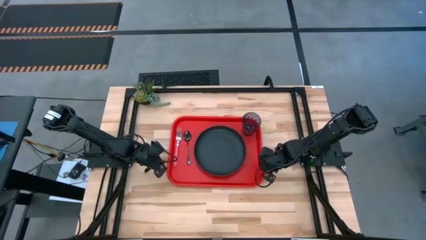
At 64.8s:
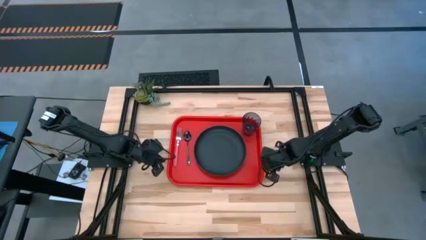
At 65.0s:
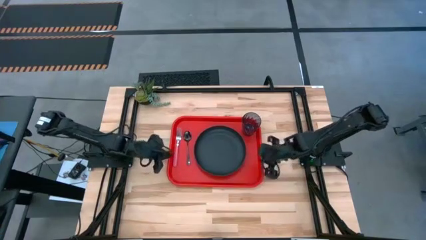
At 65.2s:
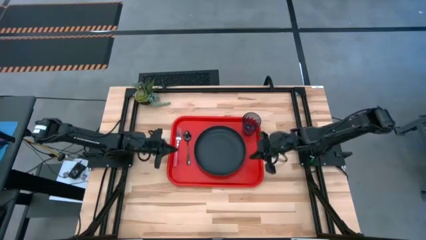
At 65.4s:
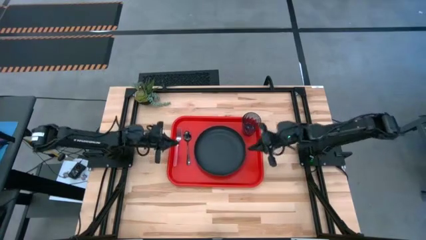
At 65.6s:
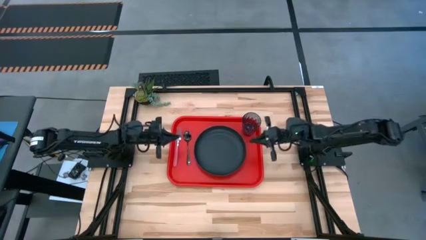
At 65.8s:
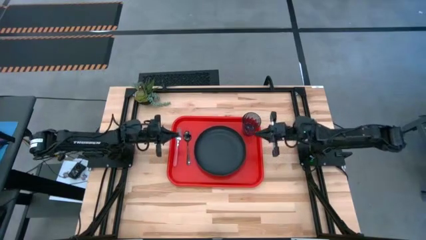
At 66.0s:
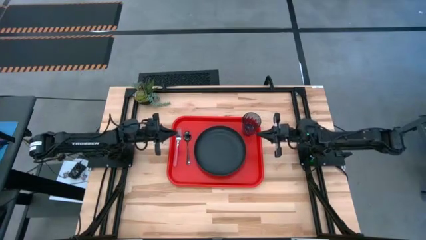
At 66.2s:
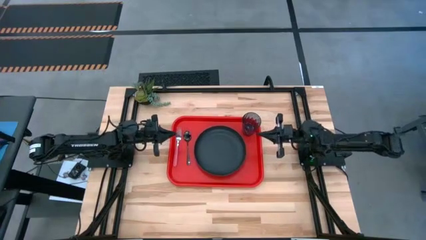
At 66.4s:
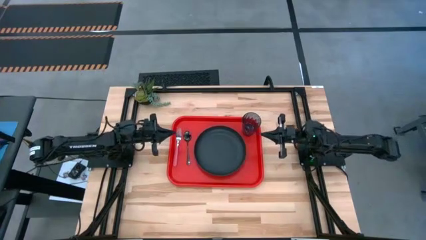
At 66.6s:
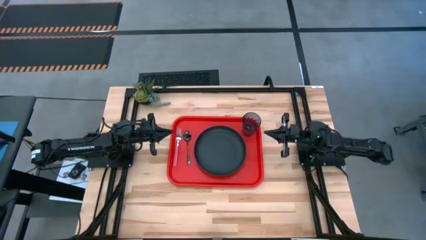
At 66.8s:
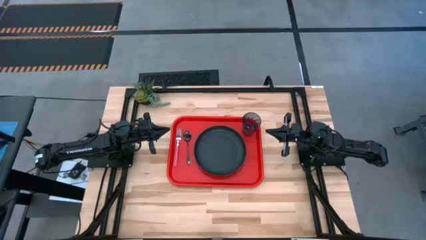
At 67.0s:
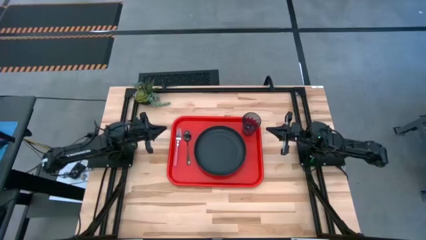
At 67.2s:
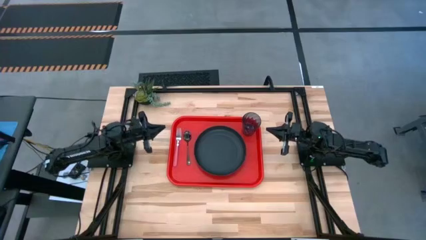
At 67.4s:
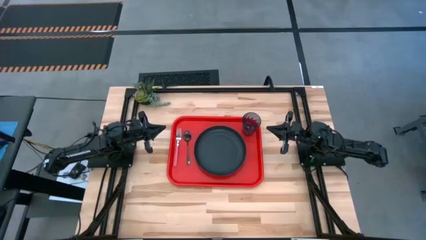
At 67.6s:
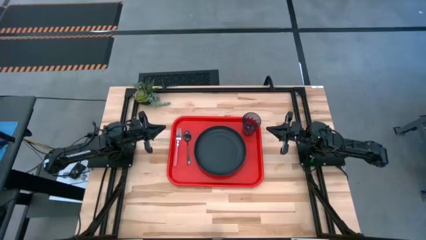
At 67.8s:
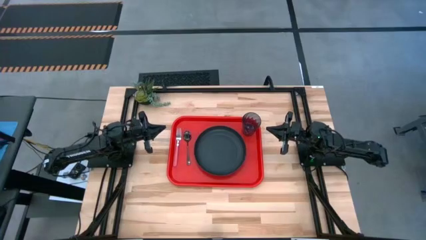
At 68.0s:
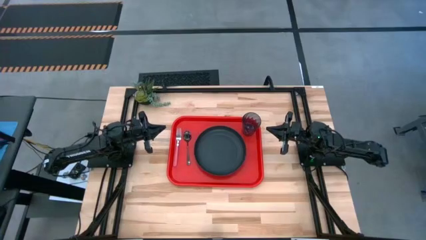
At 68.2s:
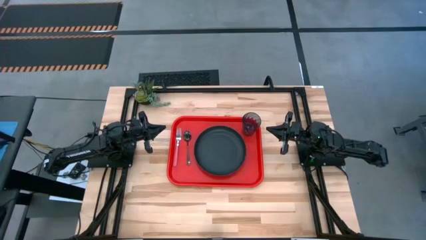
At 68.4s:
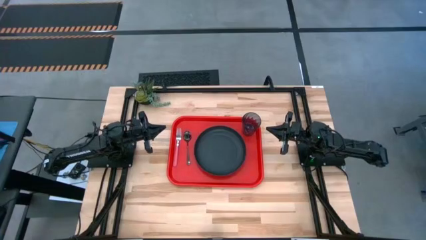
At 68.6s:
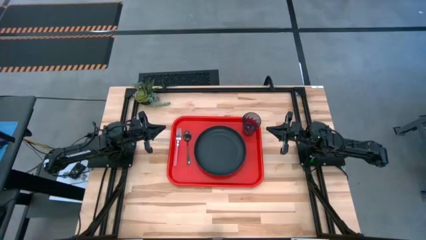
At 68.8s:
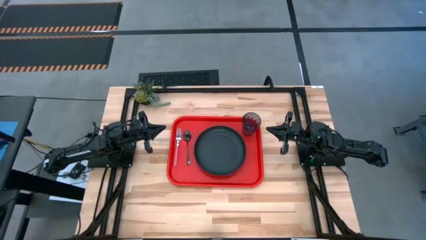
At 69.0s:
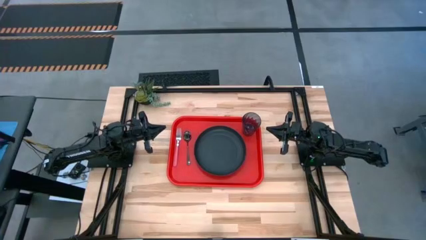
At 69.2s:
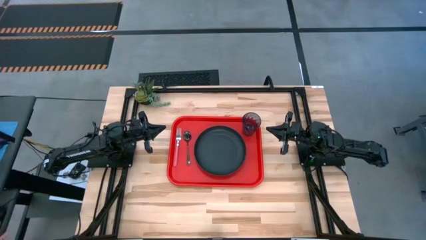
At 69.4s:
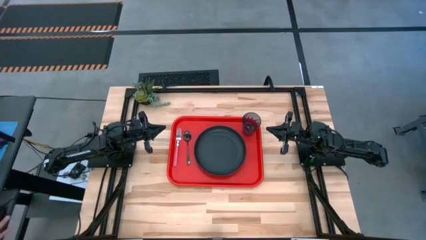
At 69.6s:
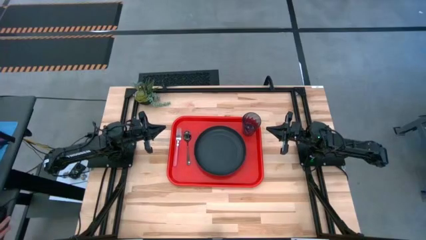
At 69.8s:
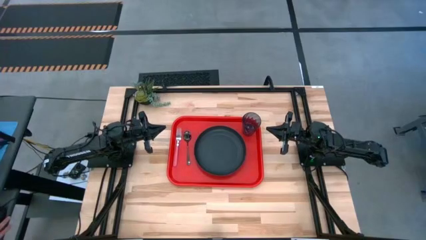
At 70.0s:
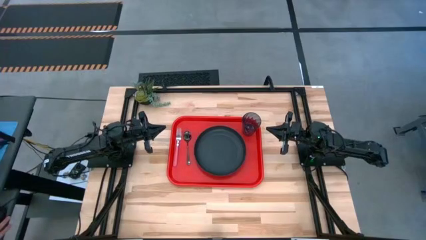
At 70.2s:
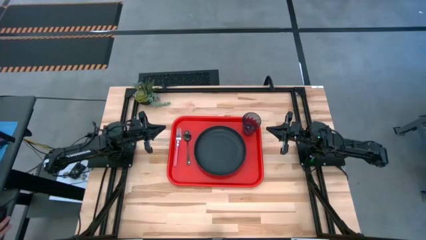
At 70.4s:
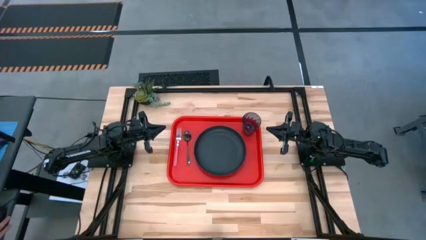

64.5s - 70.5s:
Task: Pick and place plate/cup/fork/spoon on tray
Return to Home Position

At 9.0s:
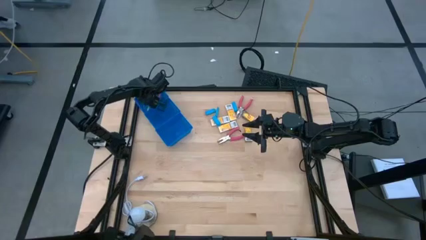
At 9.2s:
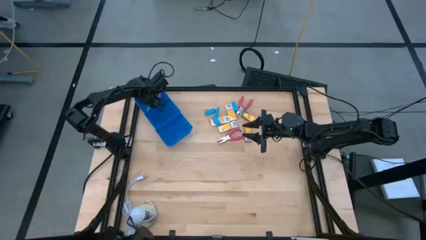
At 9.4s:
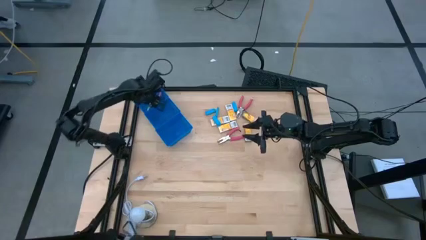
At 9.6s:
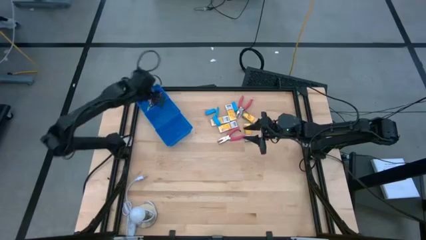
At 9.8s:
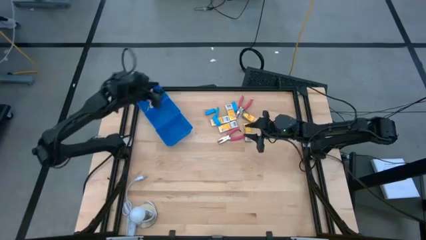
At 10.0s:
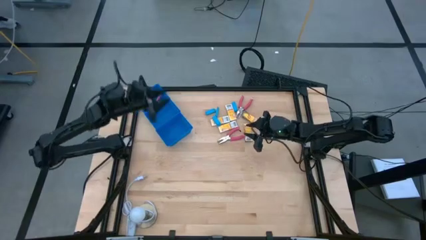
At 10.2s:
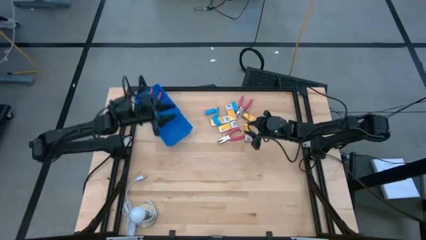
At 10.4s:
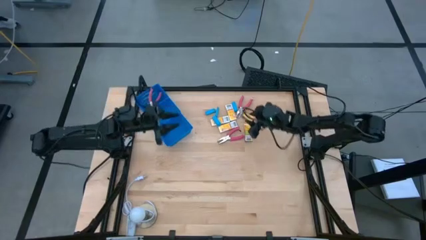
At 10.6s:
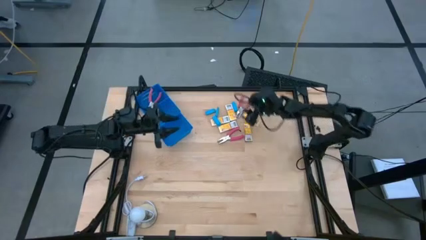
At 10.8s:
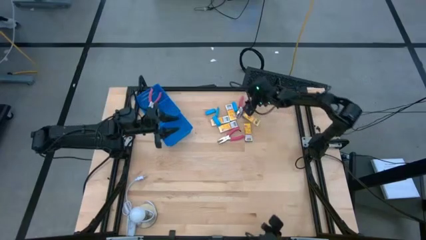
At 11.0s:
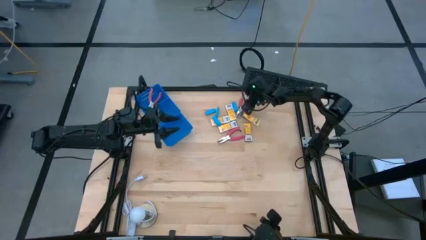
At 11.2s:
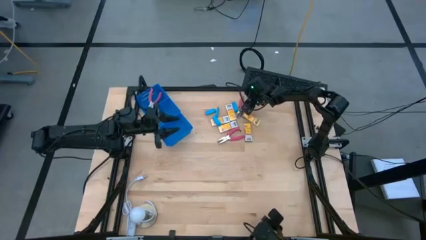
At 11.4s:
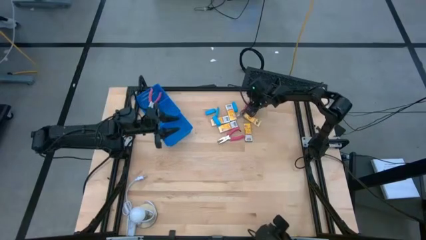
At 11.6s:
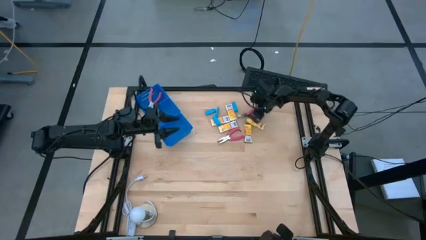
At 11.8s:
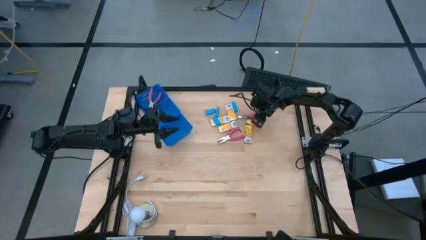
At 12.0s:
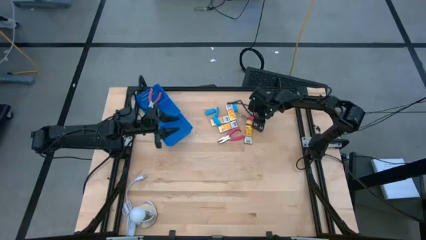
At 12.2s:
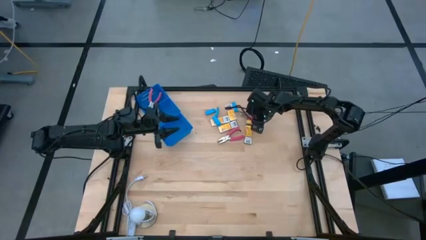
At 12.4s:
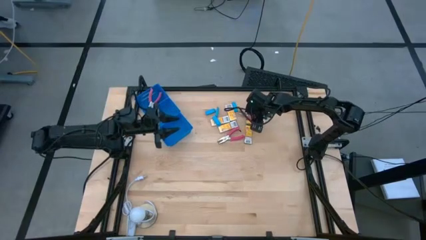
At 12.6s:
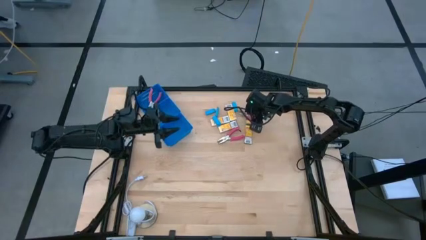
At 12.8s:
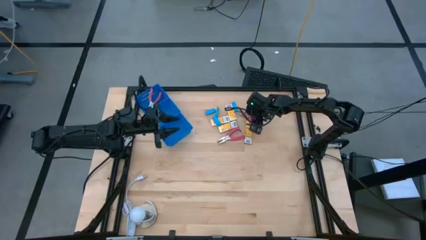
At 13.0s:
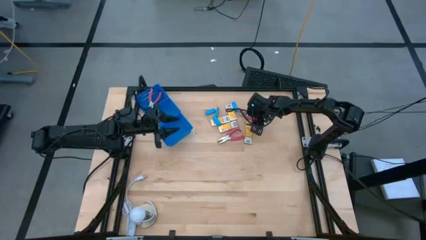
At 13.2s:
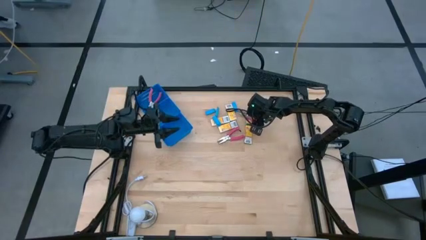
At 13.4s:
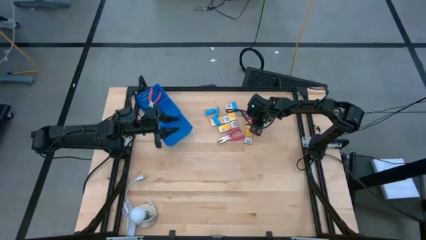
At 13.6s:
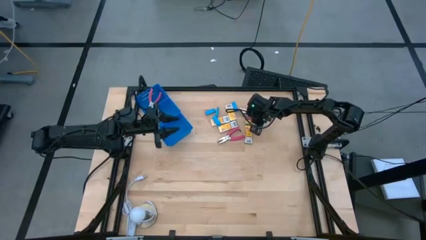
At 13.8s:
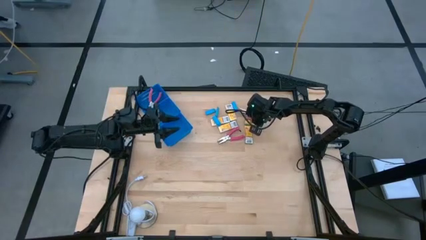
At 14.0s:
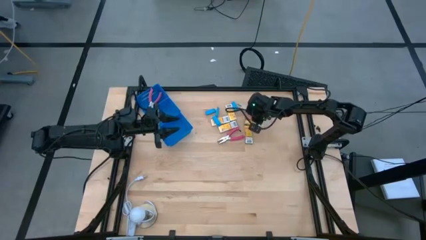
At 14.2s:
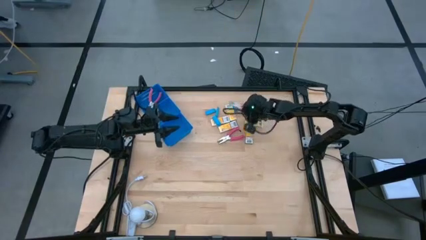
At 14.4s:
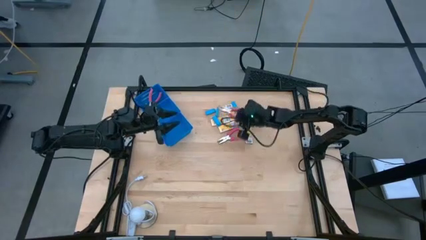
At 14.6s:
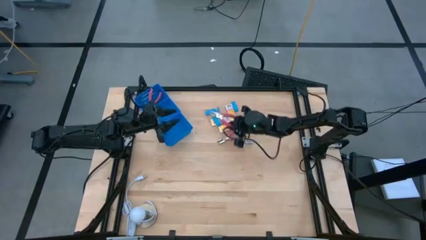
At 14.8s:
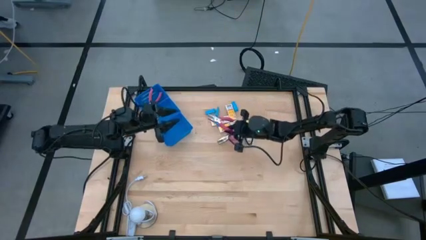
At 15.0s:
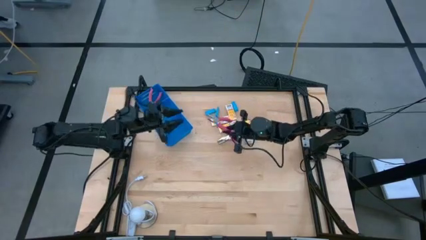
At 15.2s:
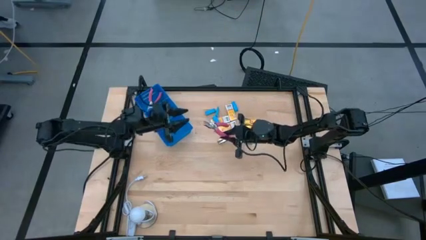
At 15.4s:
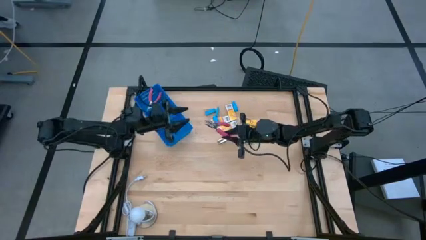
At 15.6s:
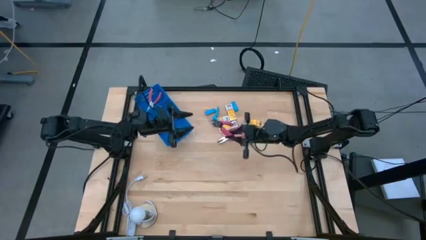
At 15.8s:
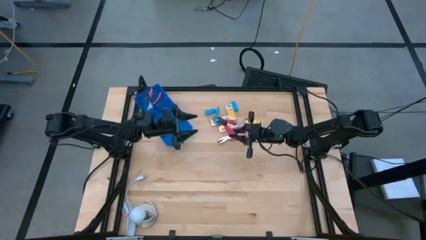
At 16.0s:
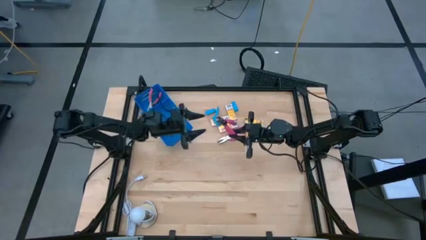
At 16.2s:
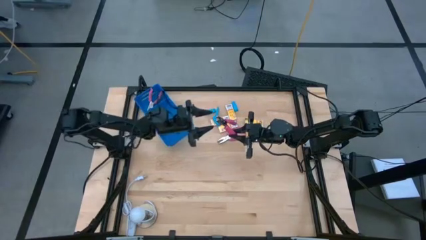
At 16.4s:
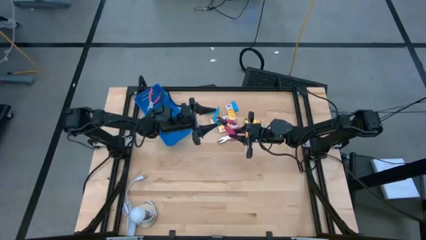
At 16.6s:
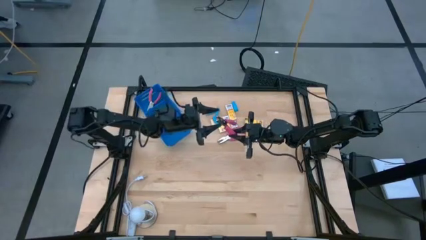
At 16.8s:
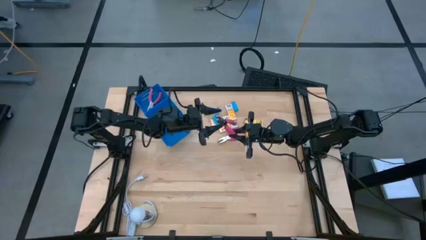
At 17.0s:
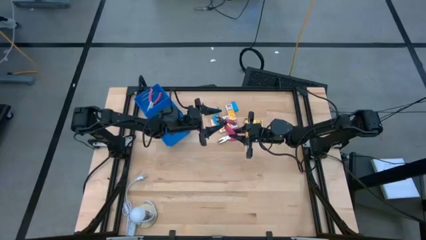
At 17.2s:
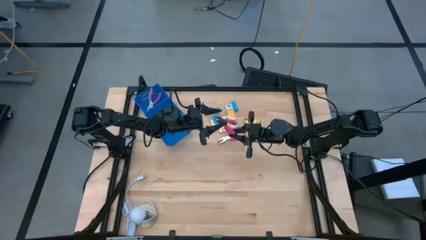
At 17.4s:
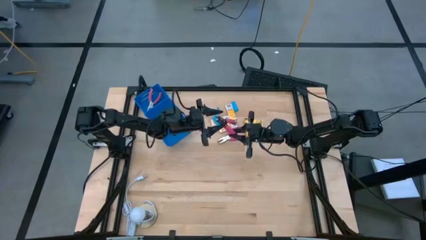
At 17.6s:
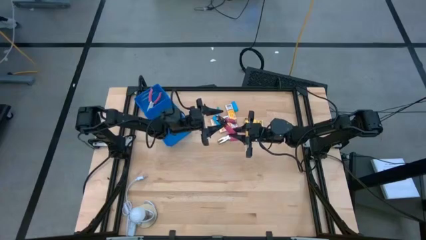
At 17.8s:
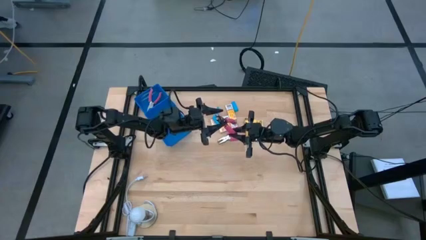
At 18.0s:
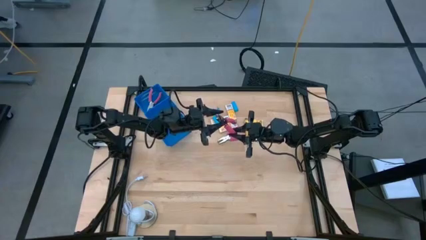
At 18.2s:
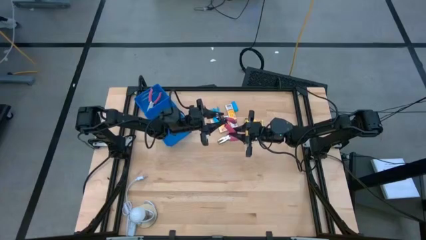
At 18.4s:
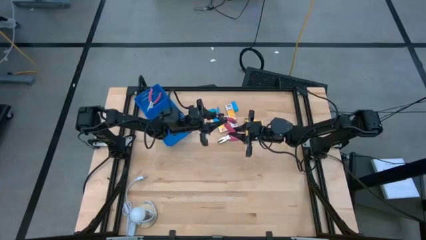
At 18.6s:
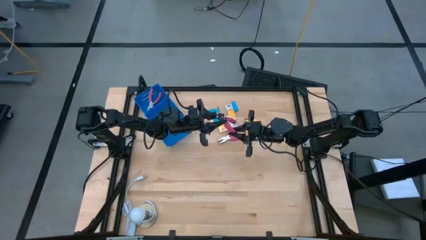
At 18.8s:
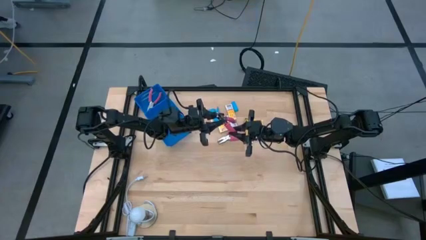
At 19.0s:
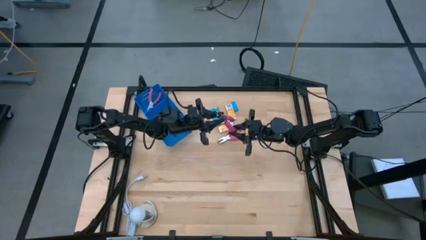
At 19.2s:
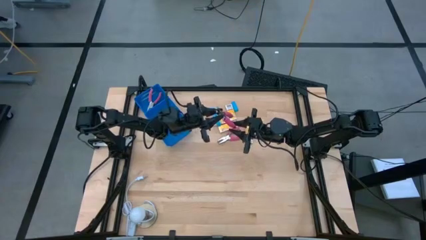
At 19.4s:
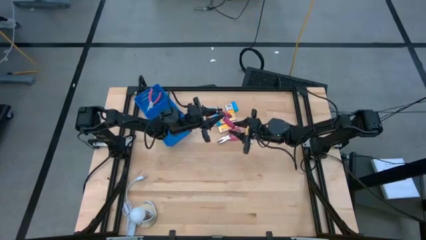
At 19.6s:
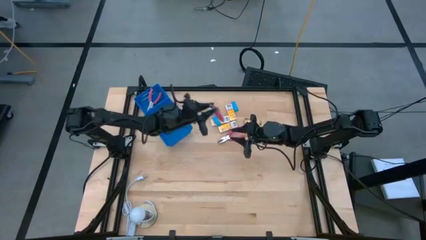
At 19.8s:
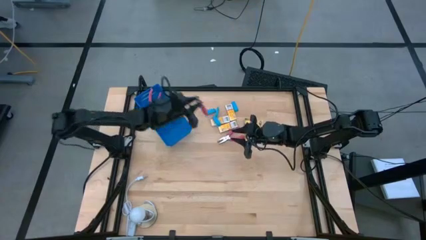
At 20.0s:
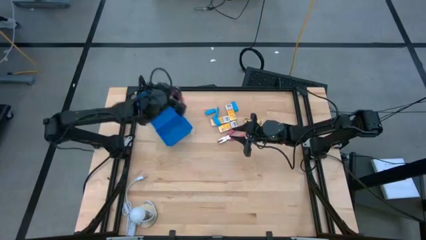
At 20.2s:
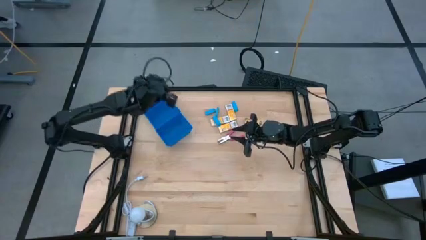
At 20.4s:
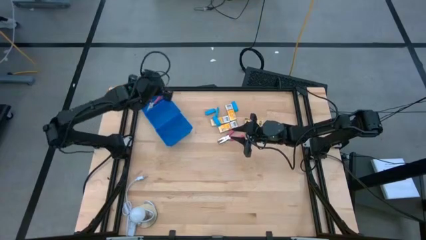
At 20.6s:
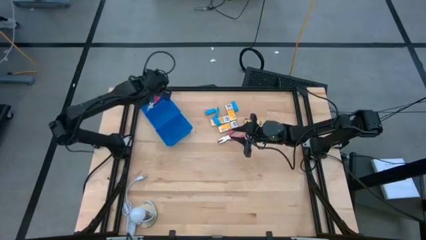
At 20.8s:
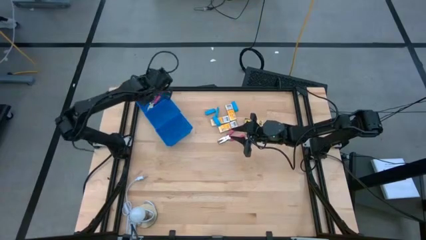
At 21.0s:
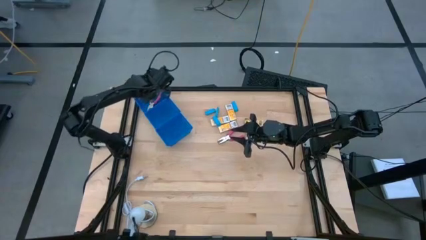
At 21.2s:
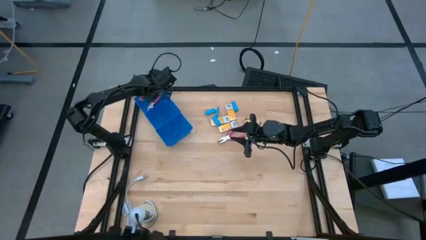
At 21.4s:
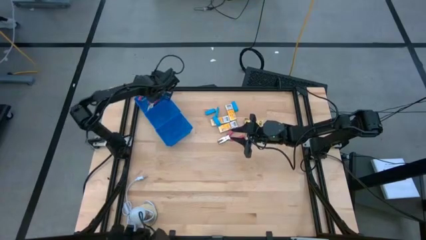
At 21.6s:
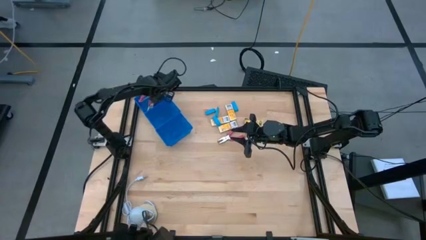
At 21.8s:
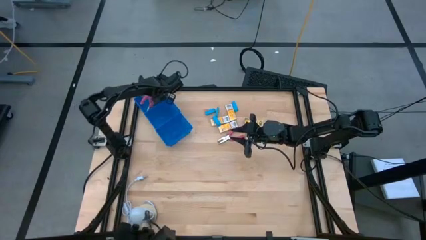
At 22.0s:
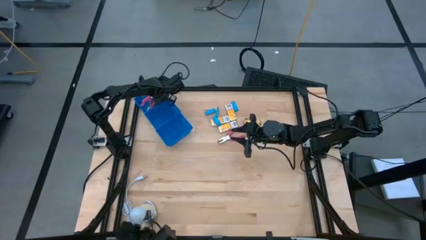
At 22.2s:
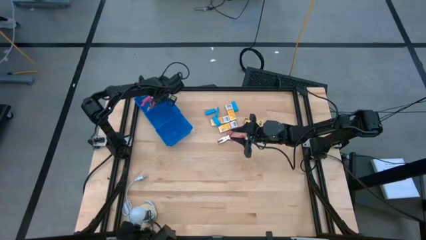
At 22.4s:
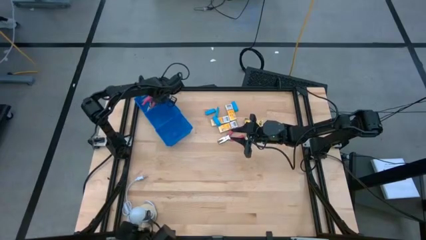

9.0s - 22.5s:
Task: Pick & Place School Supplies
Put the pink hole puncher into the top blue bin
